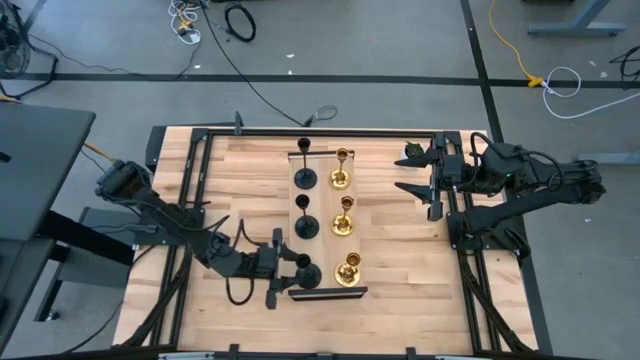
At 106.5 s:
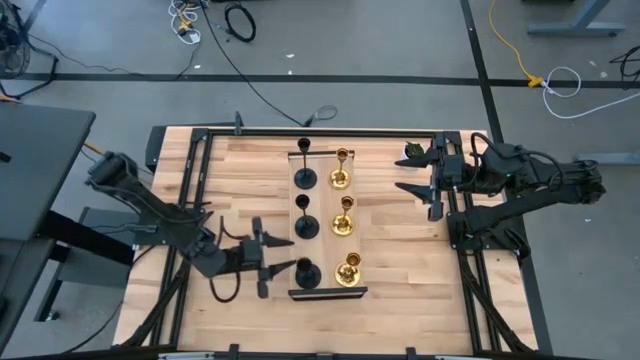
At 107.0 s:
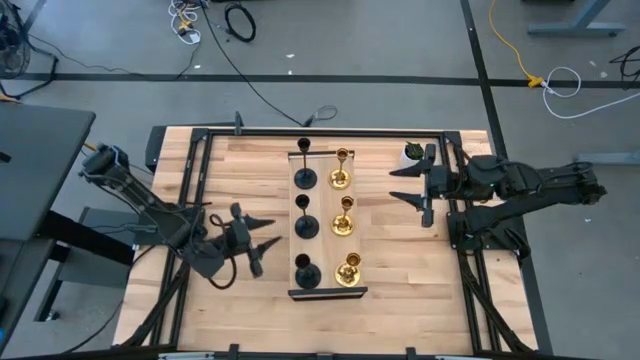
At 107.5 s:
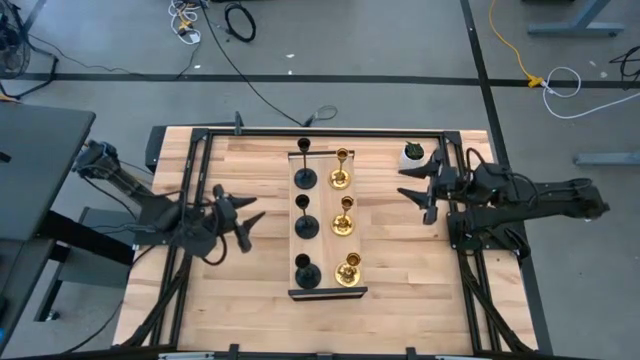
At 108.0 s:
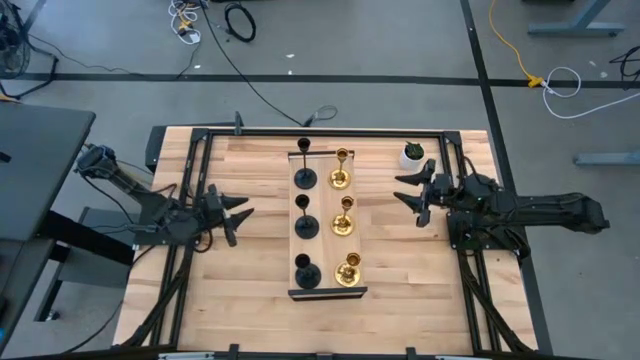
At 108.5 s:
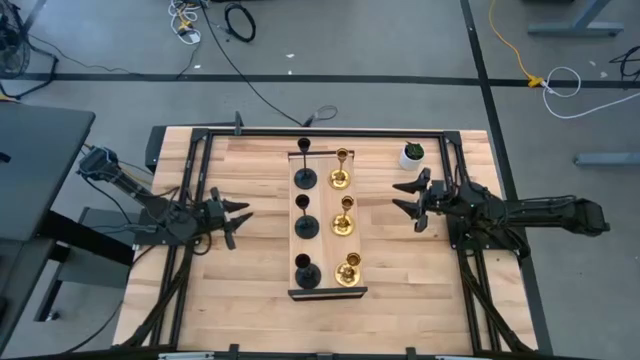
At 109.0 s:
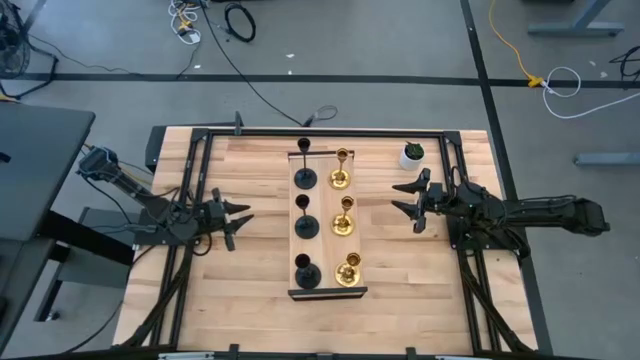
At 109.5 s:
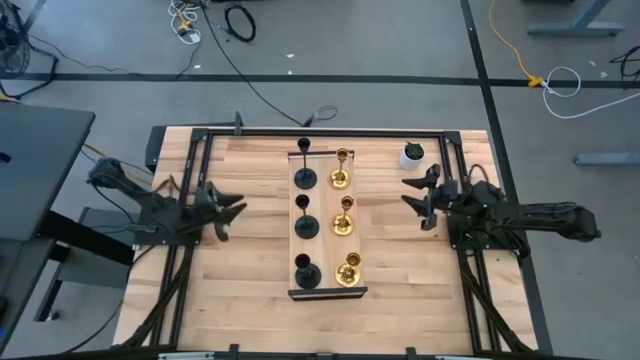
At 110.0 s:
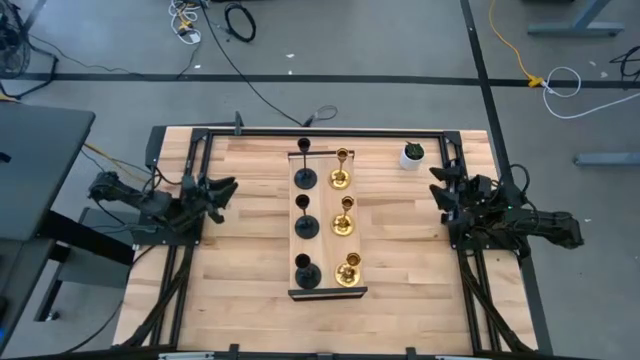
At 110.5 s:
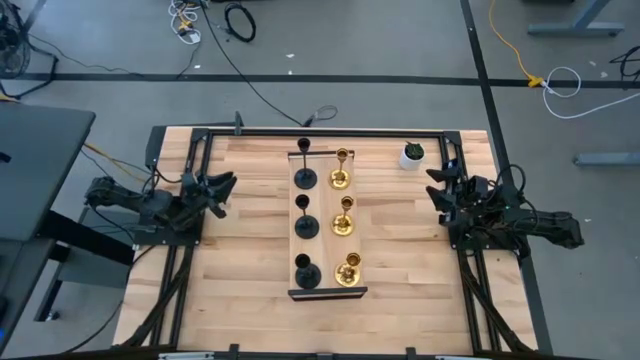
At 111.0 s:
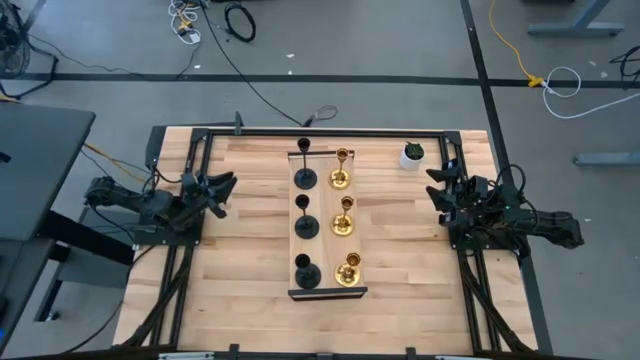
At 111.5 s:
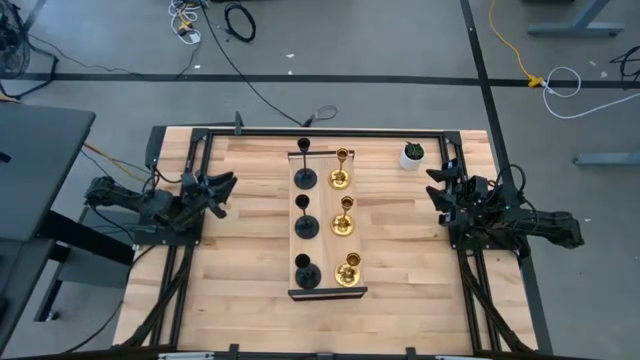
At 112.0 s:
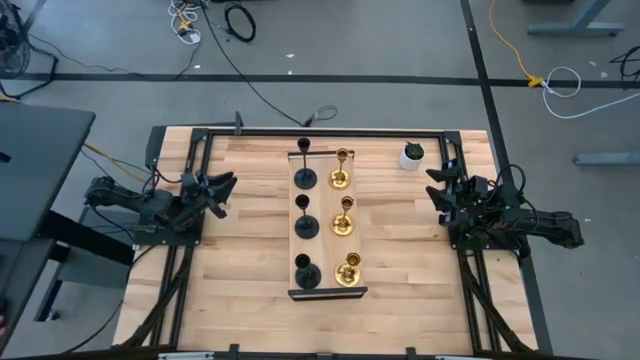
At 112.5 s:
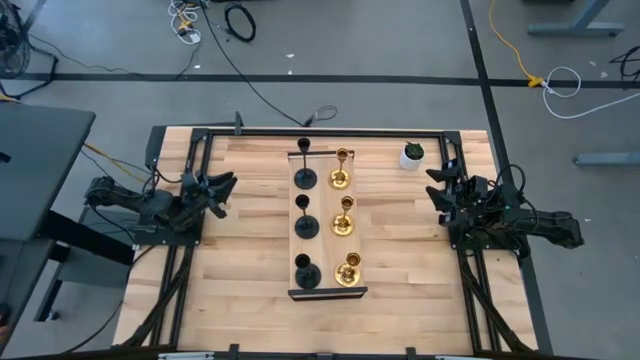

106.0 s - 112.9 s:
Task: Pick & Place candle stick holders
Return to Home Position

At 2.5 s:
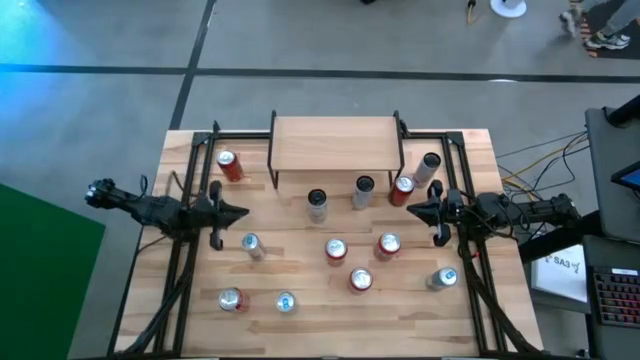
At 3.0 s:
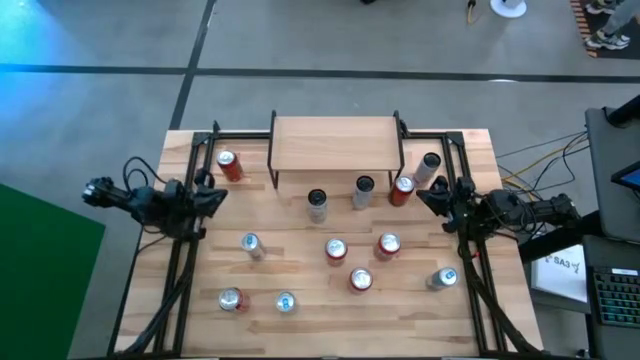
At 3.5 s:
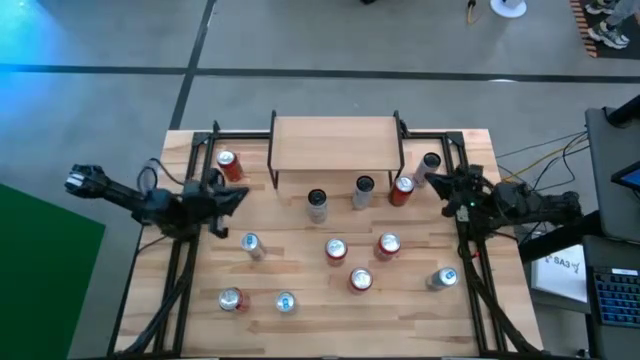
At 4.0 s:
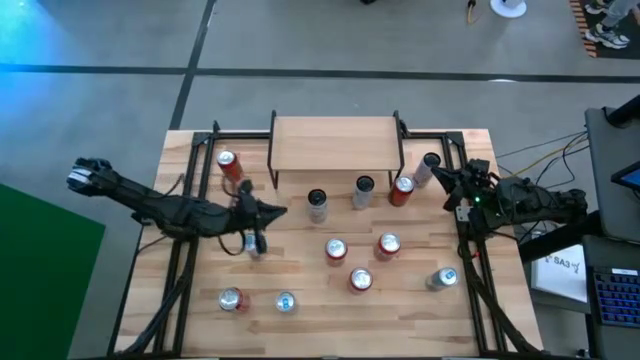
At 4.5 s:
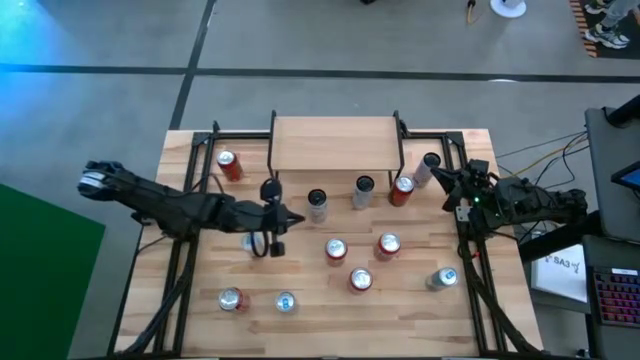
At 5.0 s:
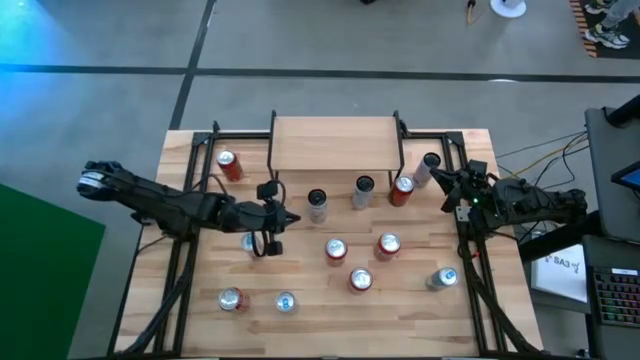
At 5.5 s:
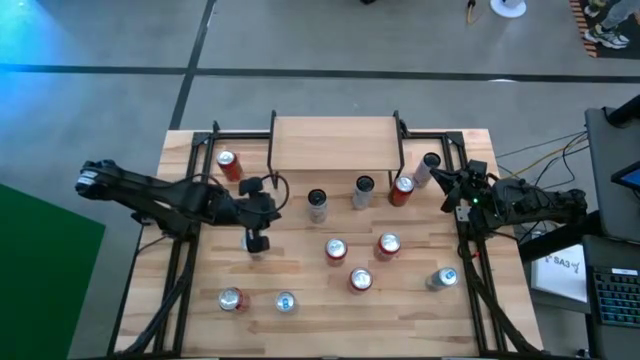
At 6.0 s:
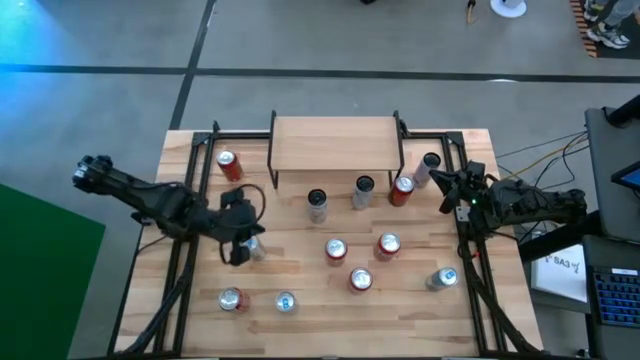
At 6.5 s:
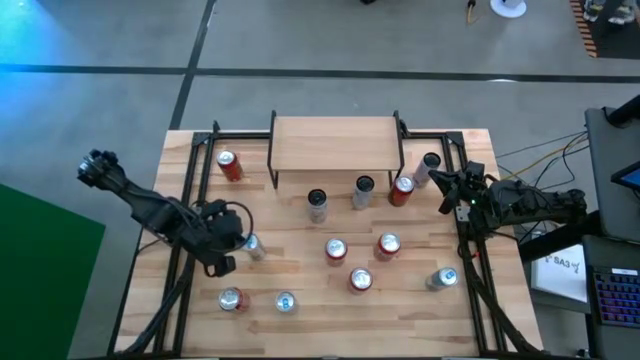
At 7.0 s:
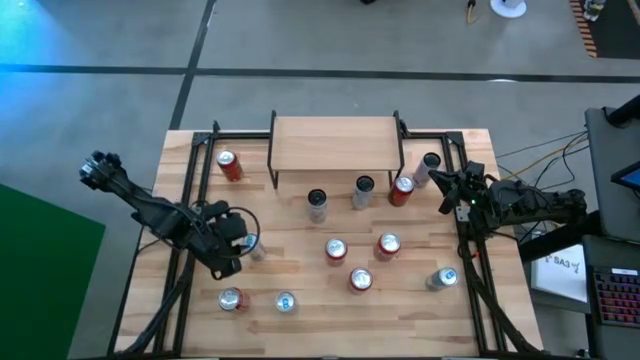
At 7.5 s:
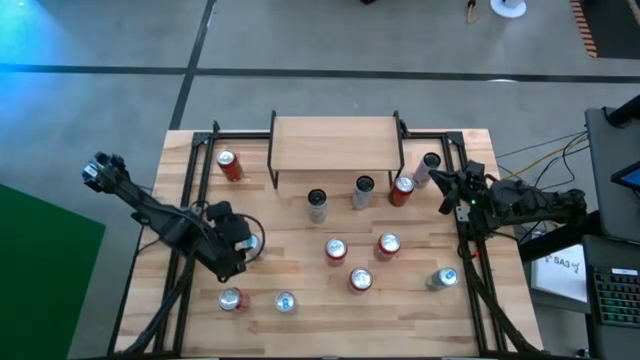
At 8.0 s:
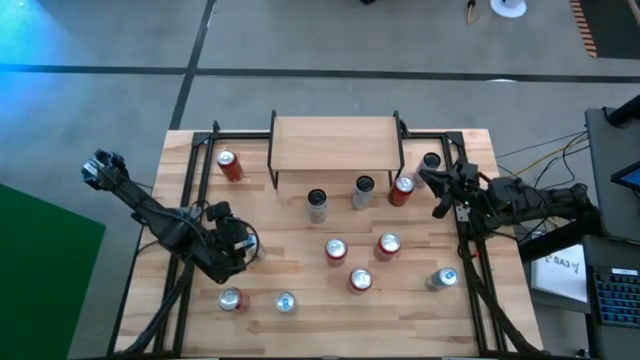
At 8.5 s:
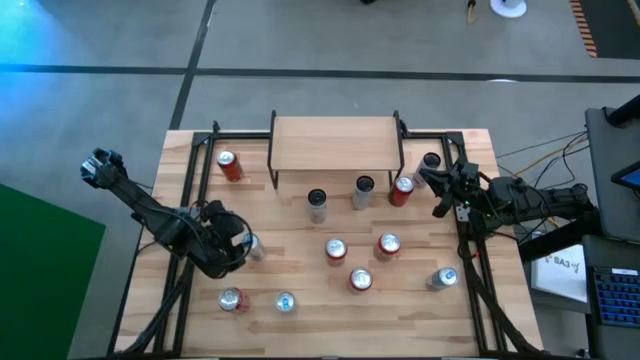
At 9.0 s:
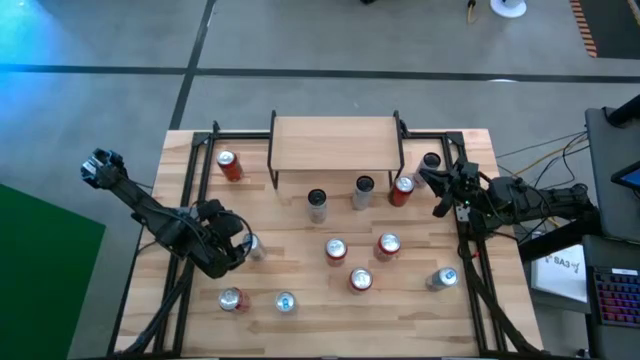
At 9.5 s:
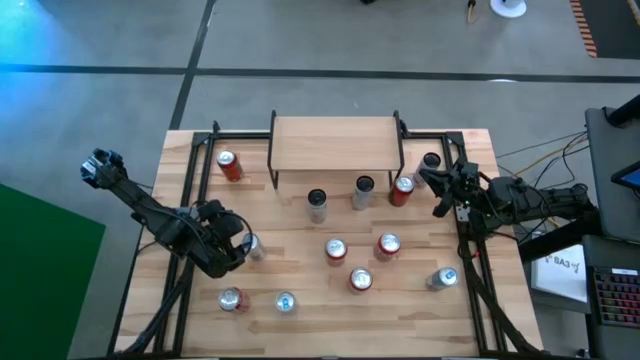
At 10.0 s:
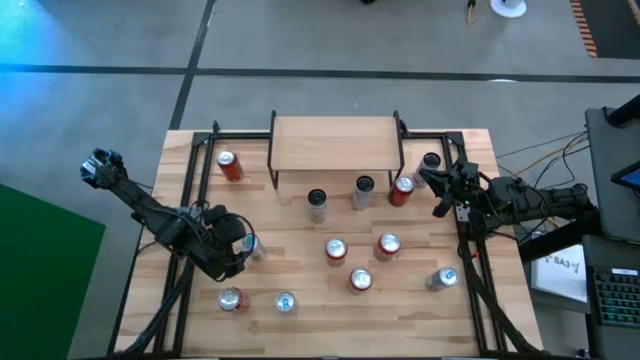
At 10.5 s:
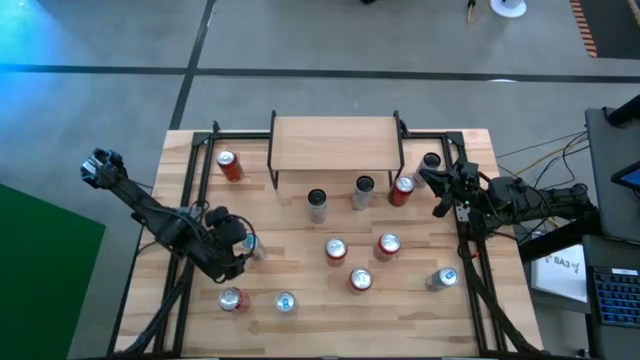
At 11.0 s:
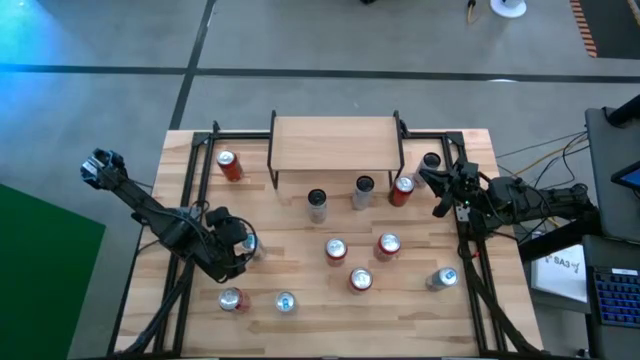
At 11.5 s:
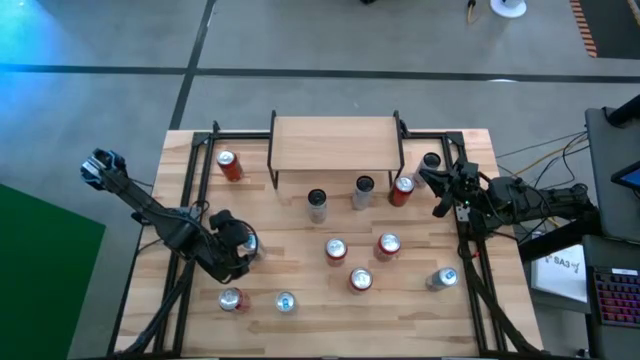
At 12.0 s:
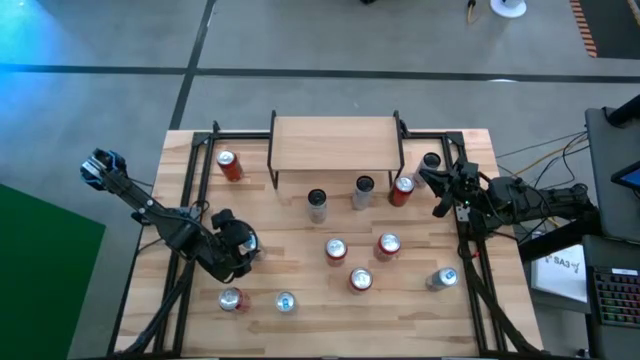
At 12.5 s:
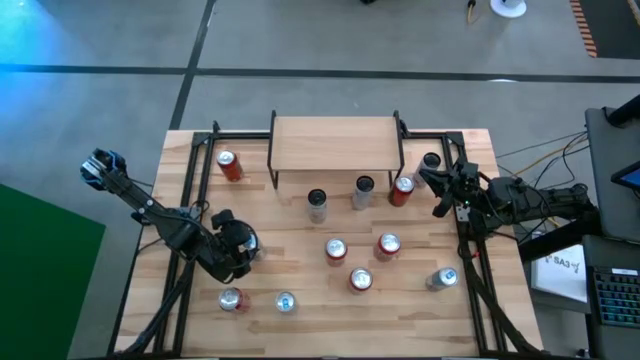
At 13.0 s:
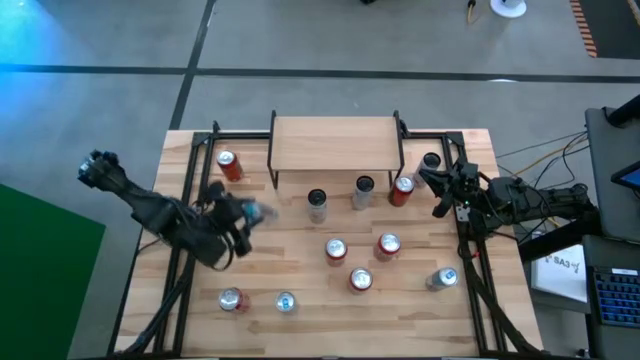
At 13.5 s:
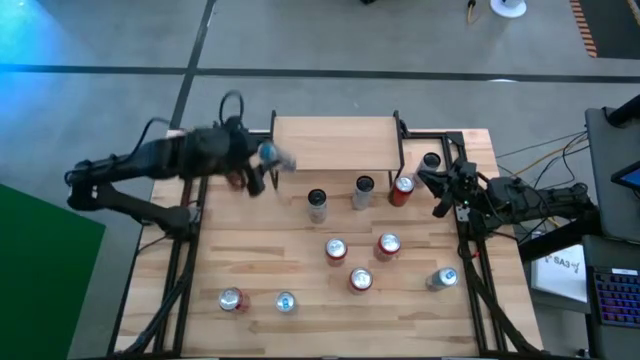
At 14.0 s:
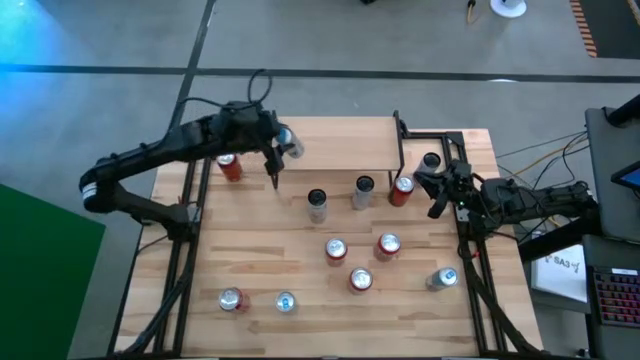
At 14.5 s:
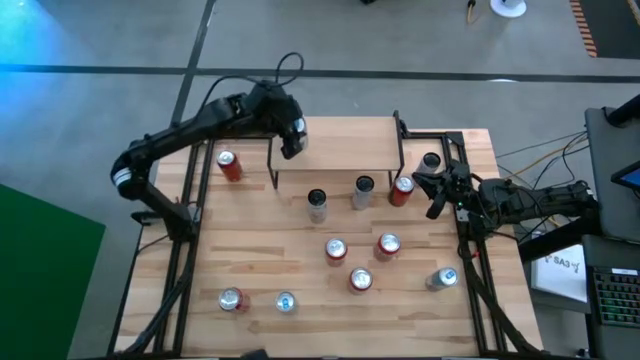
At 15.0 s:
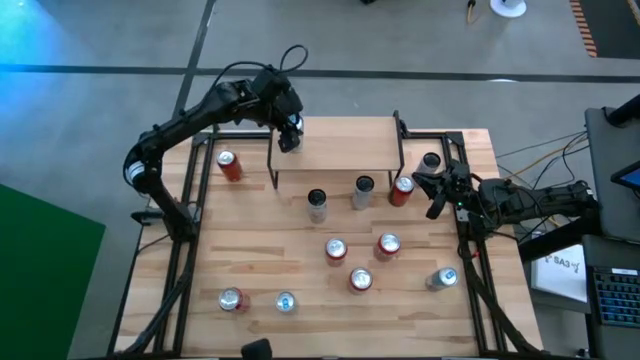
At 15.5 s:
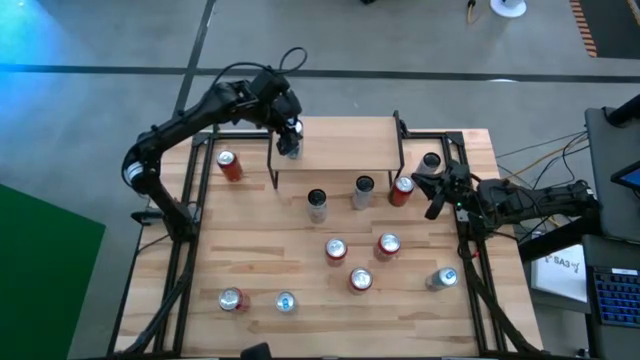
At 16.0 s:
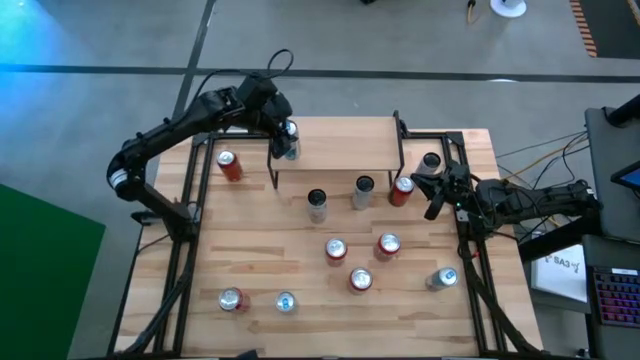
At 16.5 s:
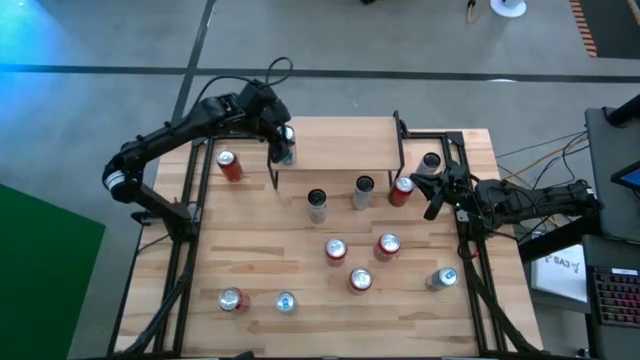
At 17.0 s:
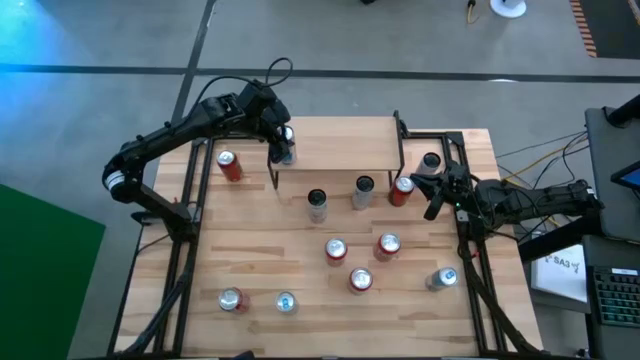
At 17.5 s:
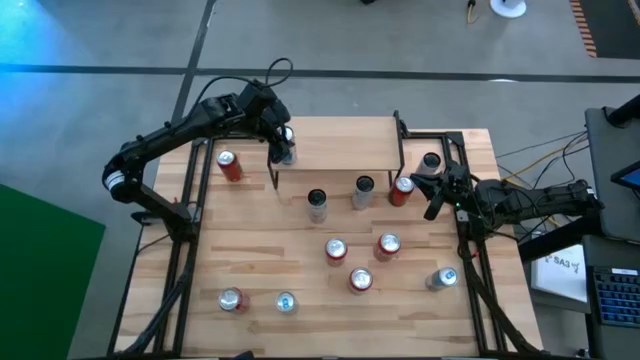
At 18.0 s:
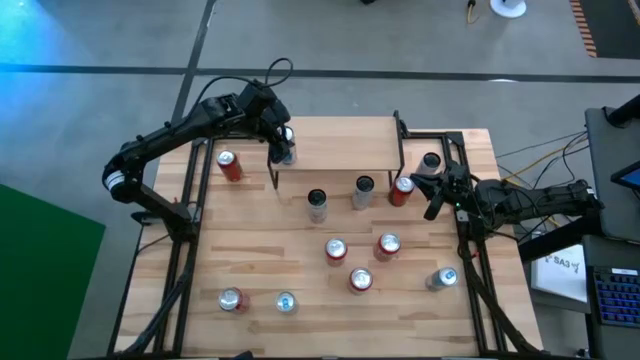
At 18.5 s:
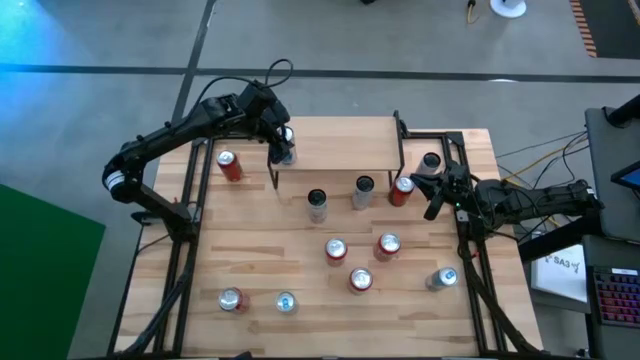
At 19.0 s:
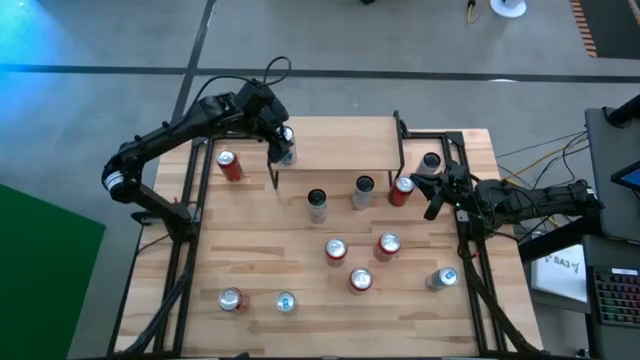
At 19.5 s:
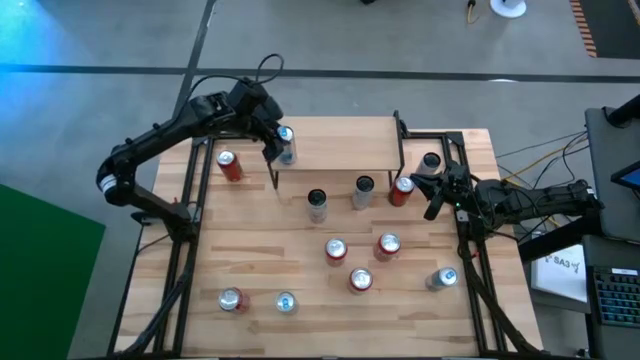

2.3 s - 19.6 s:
Task: Place canned beverage on shelf
Put the top left white blue soda can on the shelf
